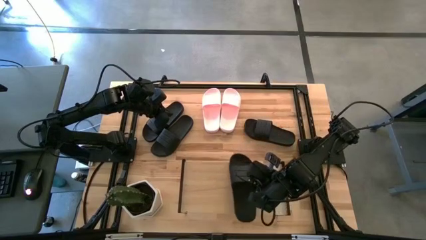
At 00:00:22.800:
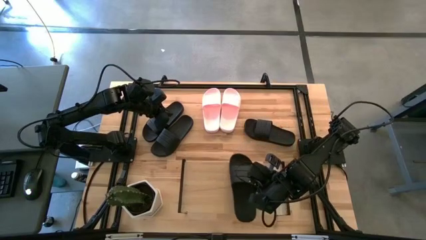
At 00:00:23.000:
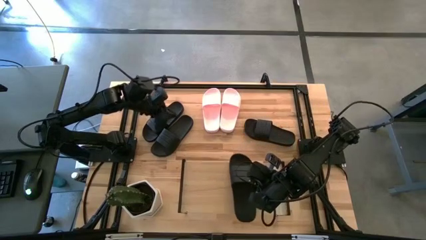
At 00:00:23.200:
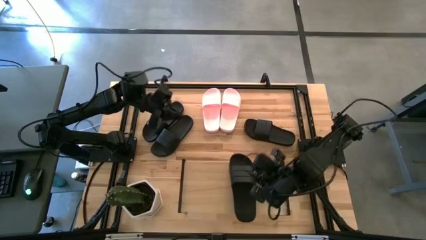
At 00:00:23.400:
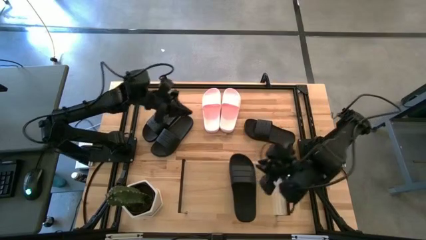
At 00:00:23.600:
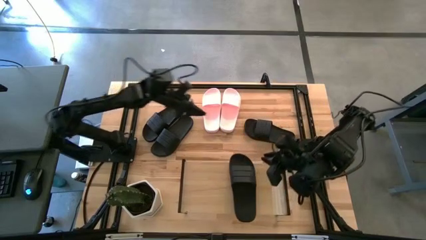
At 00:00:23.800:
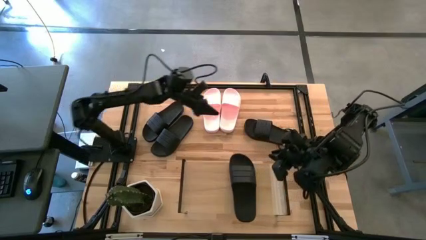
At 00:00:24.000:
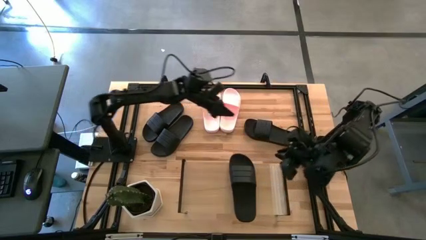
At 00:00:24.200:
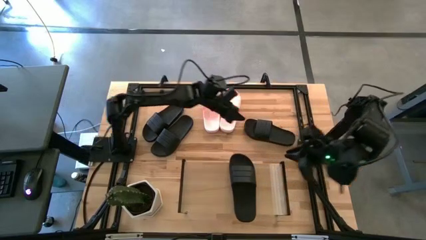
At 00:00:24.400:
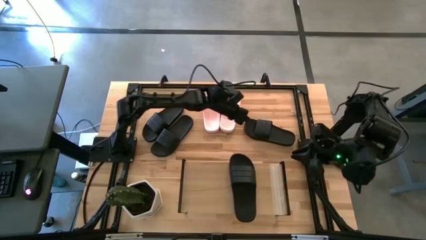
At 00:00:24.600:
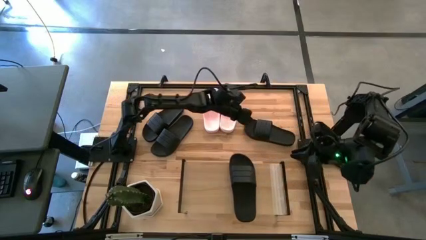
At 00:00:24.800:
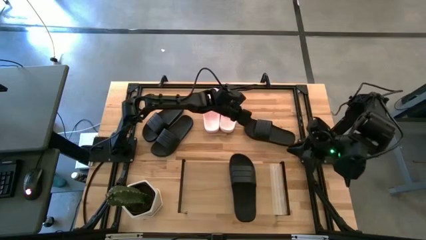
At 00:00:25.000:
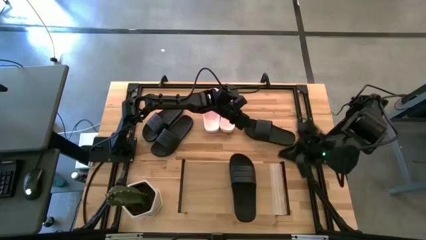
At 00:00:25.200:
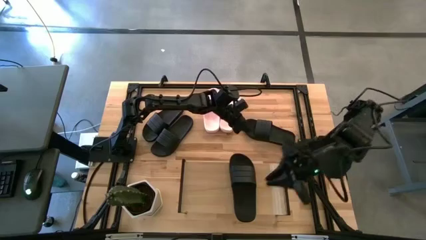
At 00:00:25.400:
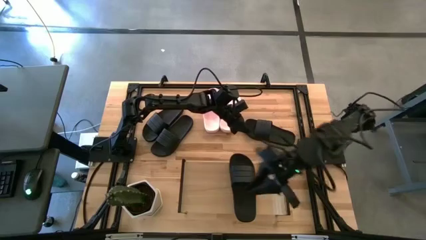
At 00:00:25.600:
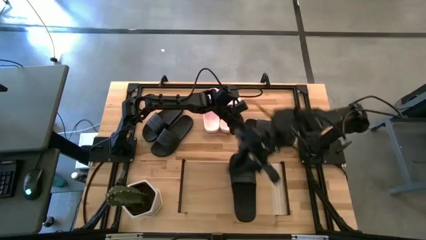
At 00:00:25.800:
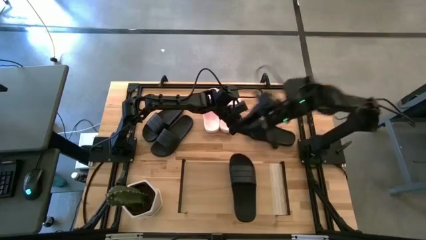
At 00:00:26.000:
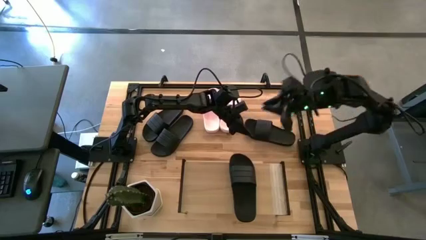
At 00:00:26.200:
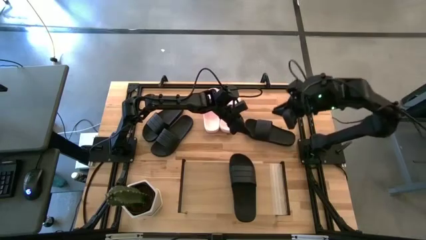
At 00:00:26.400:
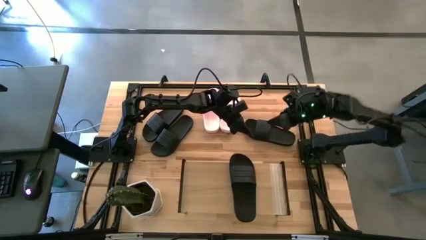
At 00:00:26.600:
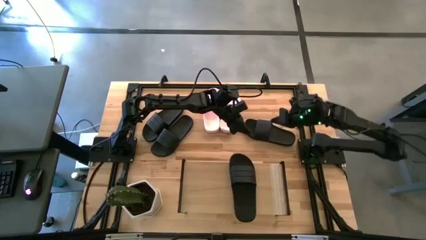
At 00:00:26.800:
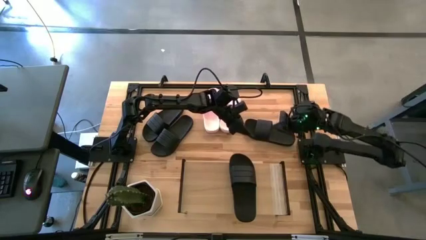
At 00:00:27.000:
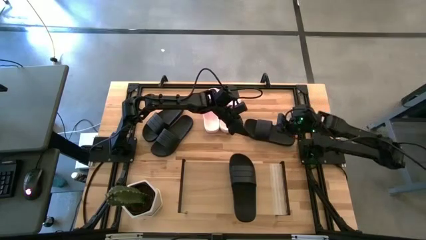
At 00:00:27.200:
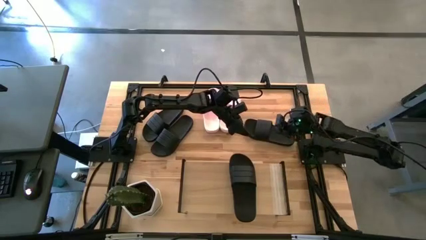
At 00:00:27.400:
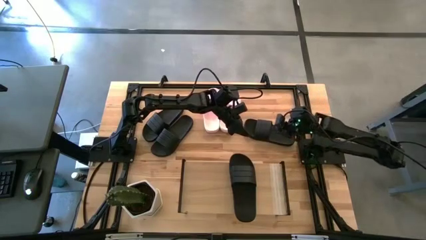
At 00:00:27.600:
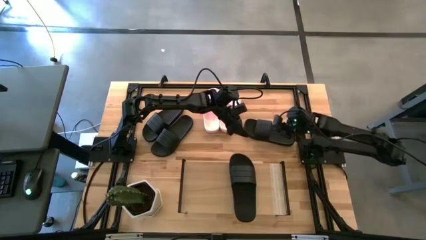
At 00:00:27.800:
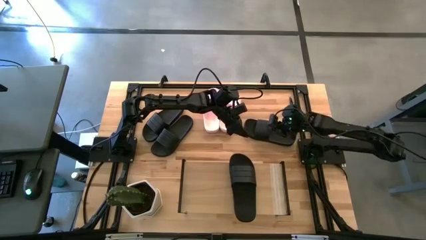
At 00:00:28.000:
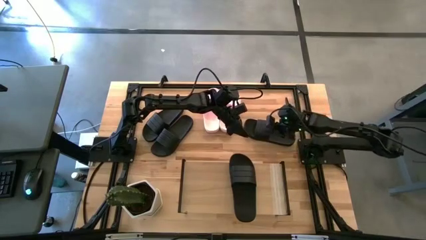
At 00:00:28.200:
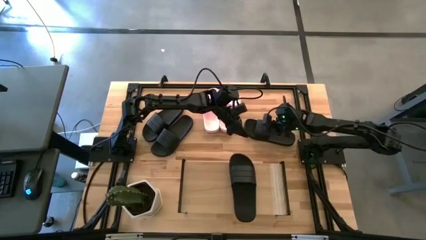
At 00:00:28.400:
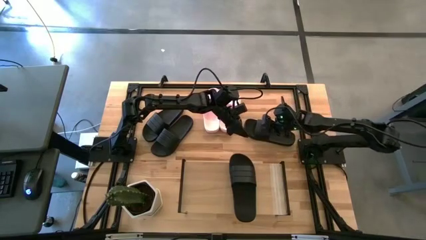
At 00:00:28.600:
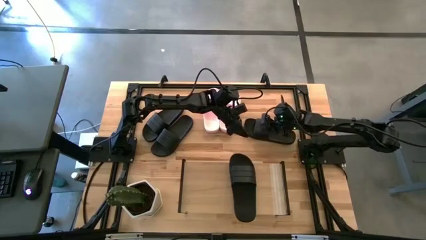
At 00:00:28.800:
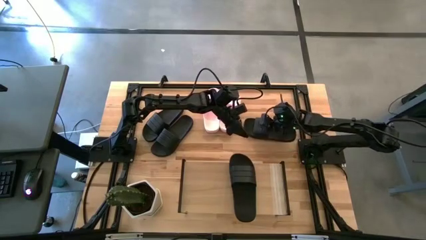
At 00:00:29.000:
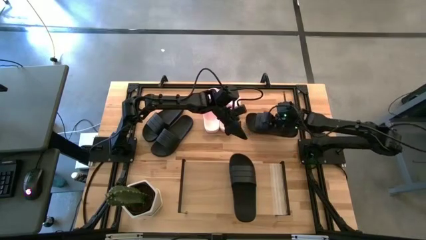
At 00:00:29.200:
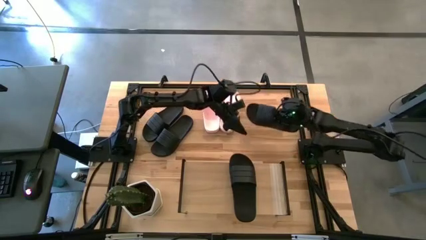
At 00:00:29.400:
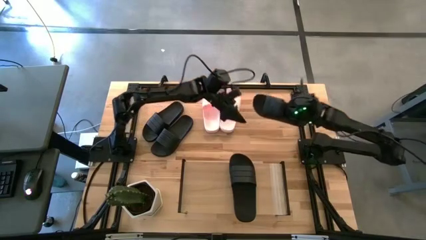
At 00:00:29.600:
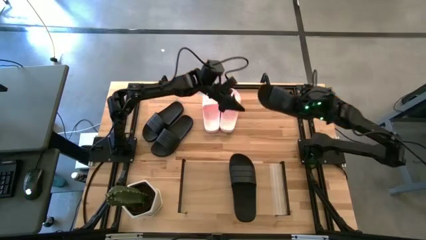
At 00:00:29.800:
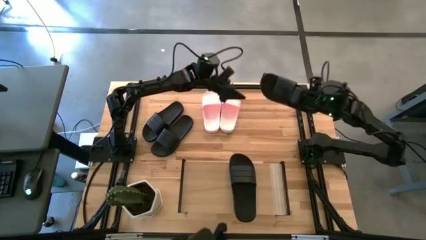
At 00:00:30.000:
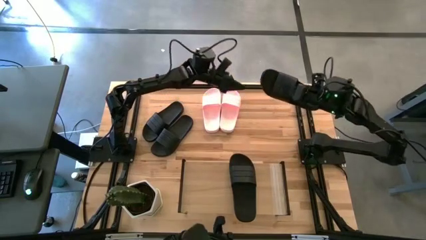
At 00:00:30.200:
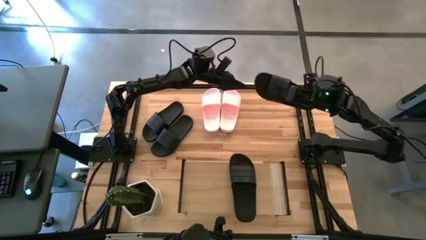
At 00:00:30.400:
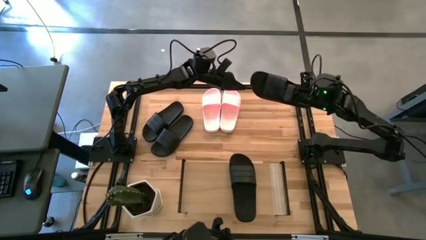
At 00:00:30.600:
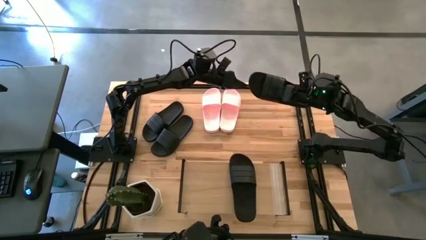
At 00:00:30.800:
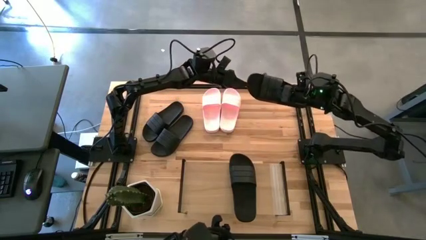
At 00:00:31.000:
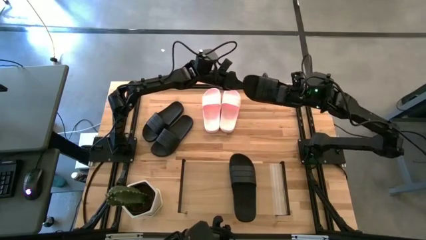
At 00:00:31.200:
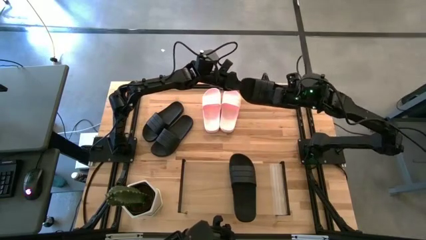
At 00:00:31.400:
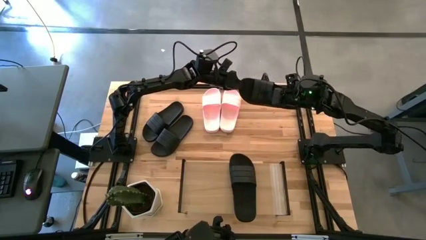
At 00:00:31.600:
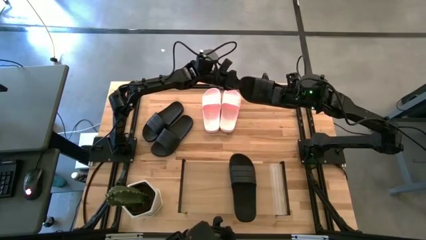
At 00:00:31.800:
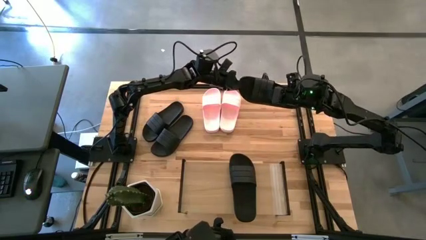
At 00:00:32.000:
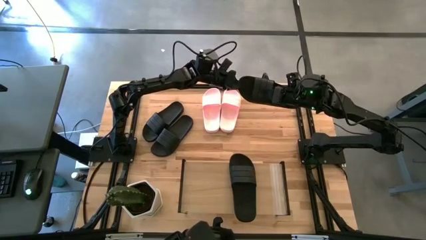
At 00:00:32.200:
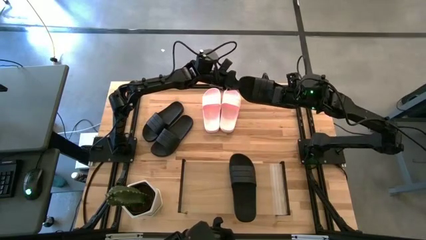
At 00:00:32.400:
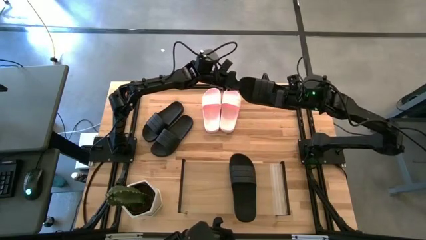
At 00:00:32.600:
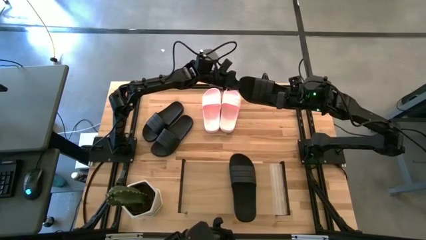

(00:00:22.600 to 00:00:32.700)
Task: Pick and place slides into the shelf
Put the black slipper on the shelf
